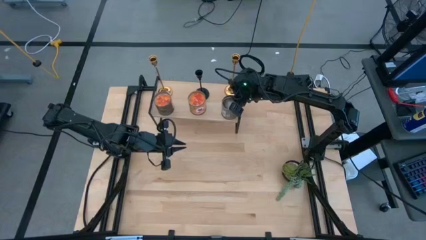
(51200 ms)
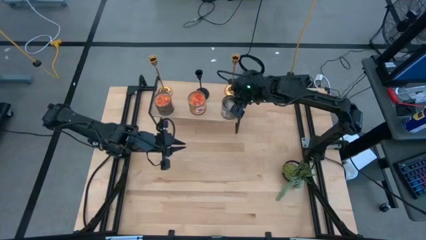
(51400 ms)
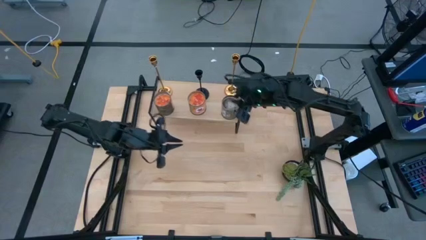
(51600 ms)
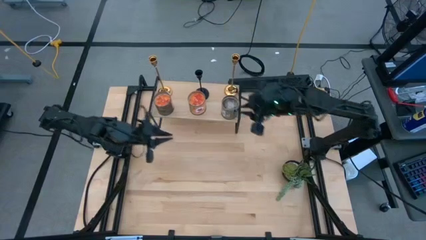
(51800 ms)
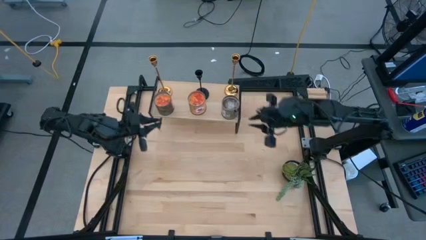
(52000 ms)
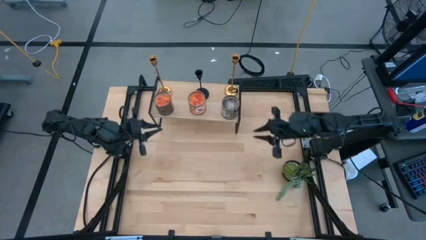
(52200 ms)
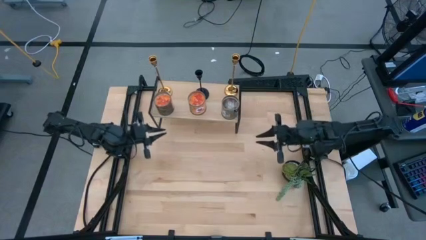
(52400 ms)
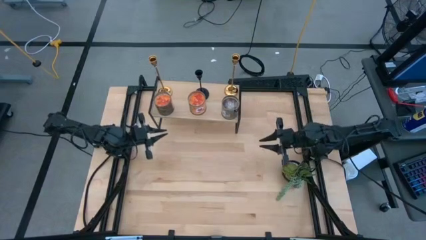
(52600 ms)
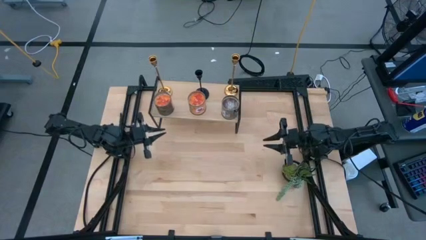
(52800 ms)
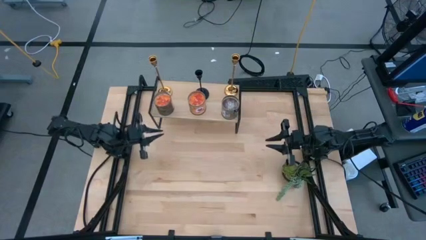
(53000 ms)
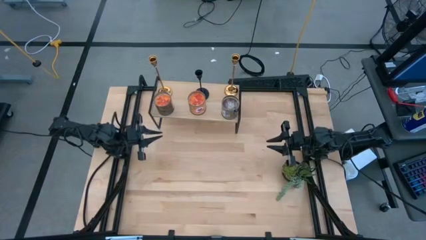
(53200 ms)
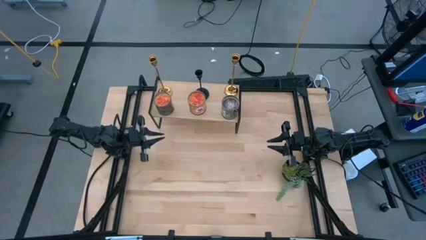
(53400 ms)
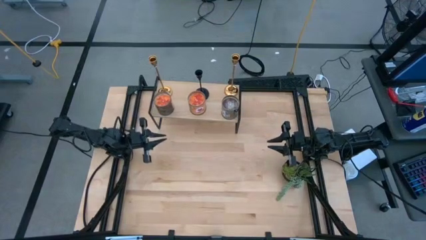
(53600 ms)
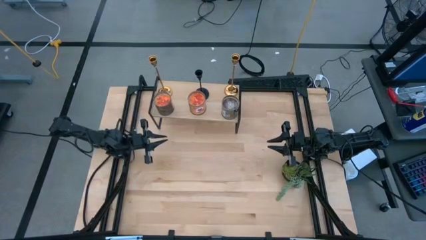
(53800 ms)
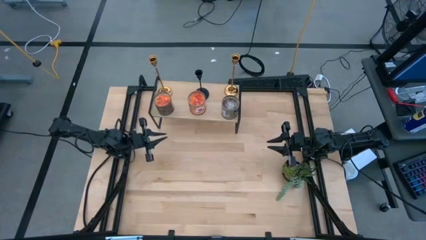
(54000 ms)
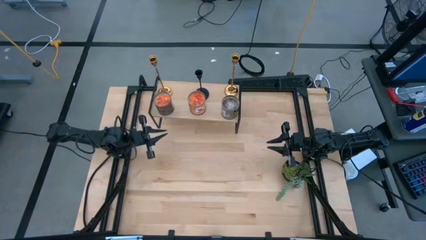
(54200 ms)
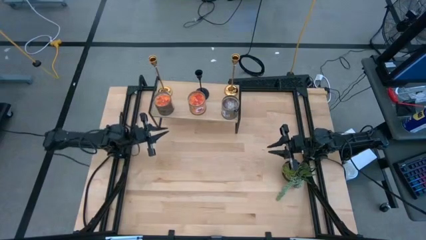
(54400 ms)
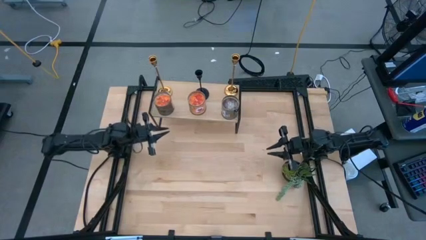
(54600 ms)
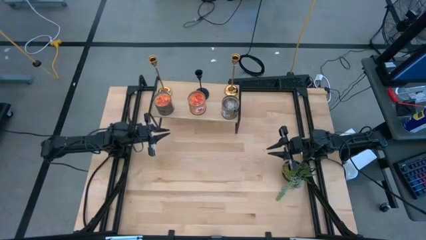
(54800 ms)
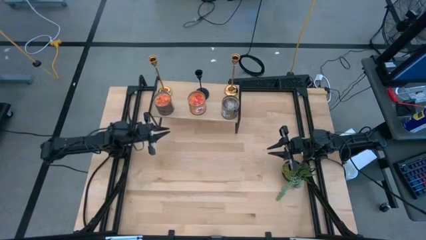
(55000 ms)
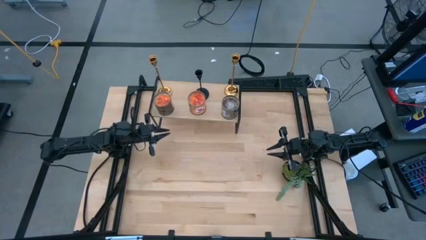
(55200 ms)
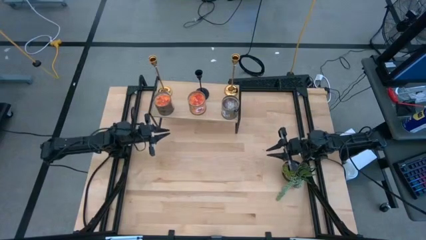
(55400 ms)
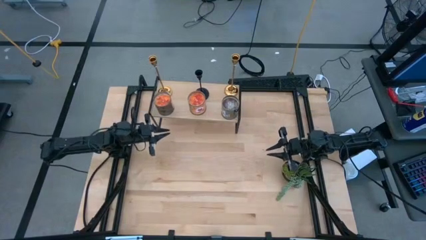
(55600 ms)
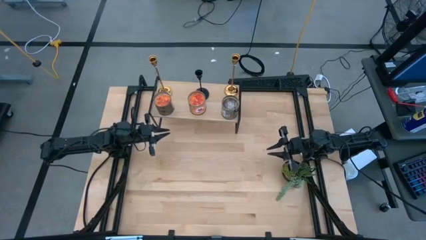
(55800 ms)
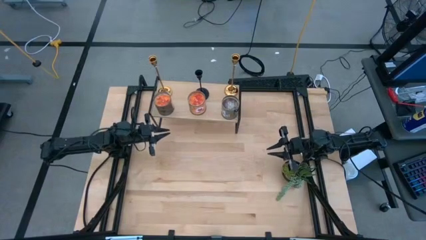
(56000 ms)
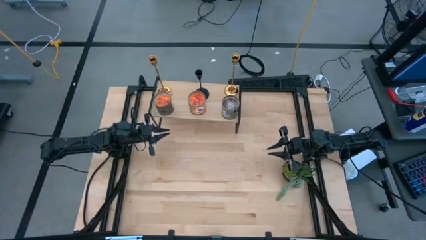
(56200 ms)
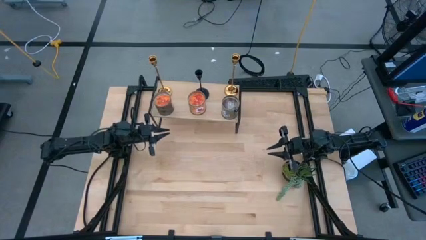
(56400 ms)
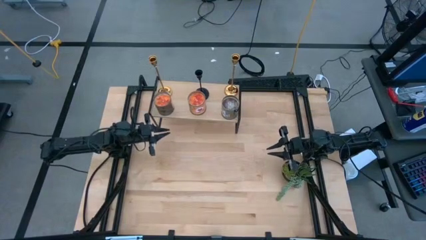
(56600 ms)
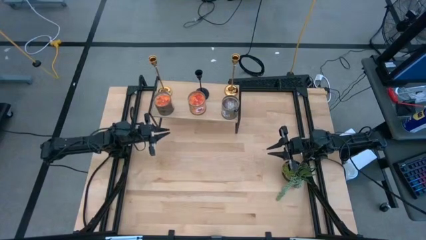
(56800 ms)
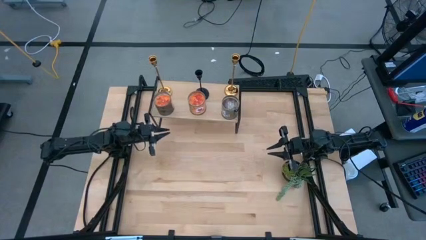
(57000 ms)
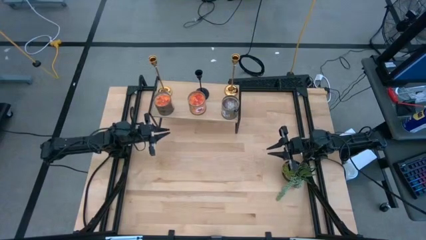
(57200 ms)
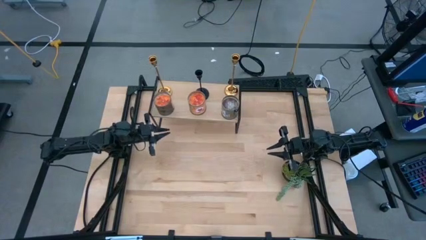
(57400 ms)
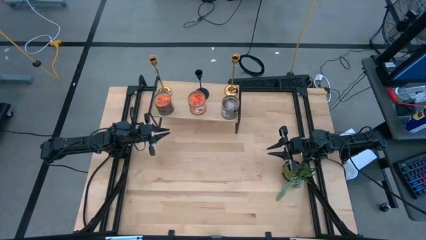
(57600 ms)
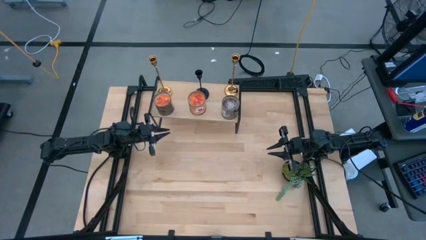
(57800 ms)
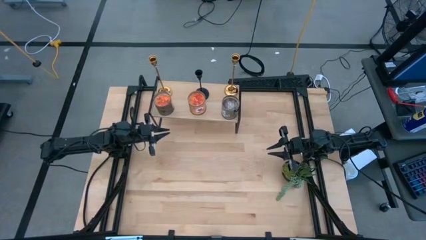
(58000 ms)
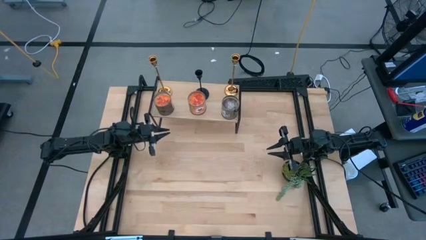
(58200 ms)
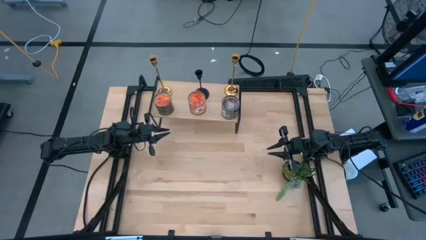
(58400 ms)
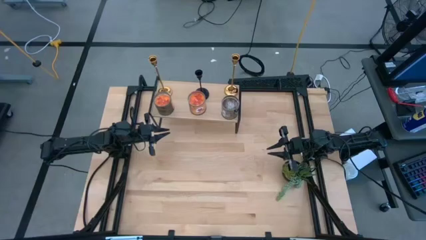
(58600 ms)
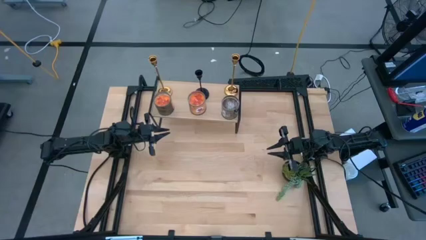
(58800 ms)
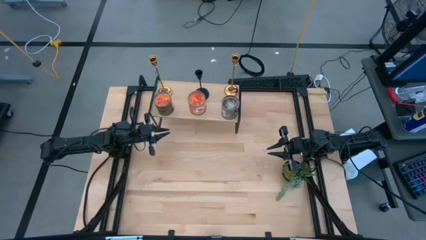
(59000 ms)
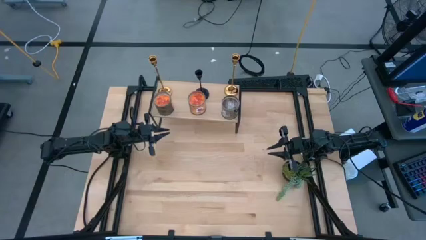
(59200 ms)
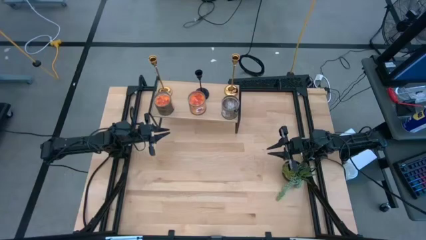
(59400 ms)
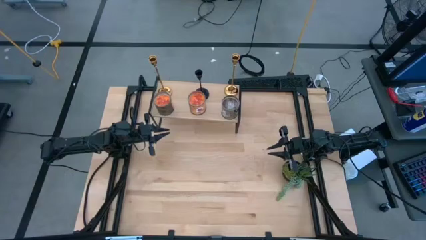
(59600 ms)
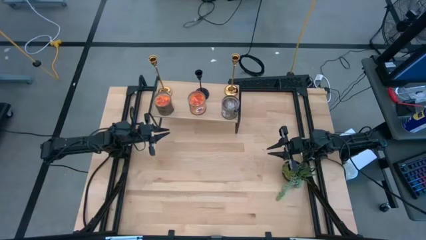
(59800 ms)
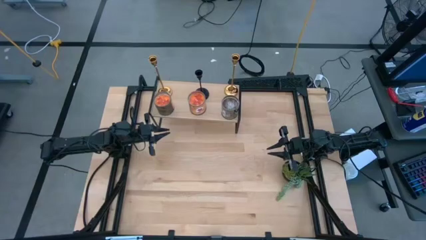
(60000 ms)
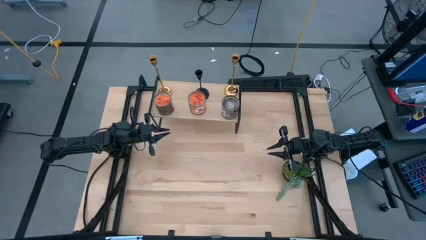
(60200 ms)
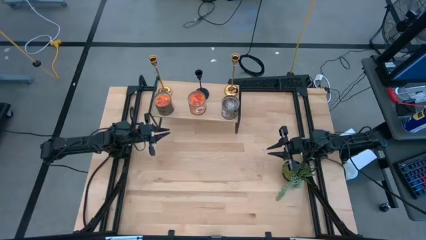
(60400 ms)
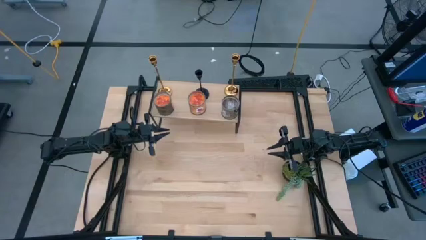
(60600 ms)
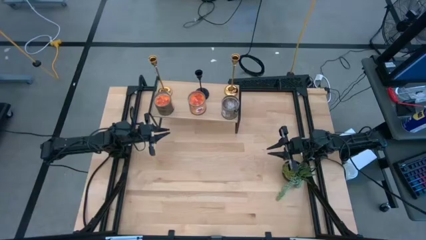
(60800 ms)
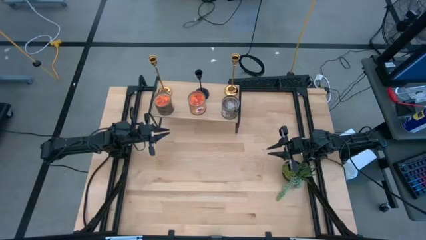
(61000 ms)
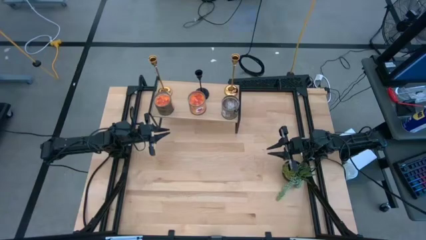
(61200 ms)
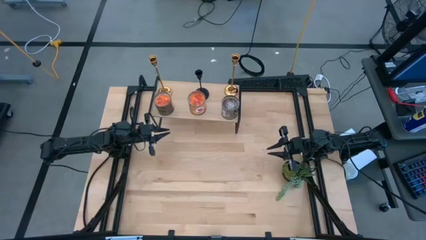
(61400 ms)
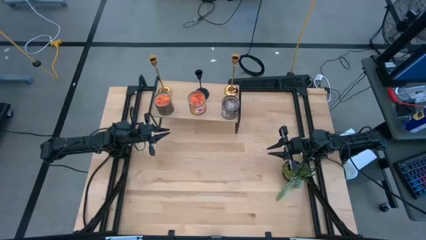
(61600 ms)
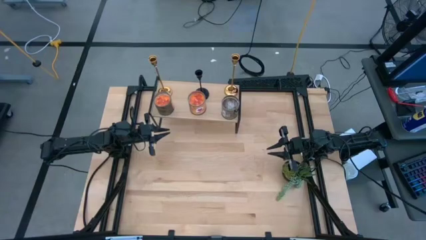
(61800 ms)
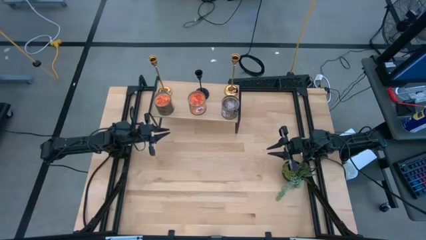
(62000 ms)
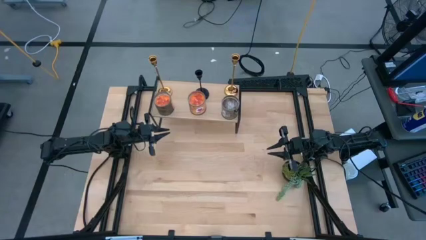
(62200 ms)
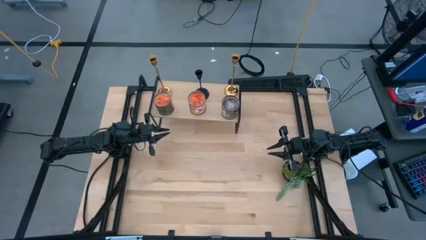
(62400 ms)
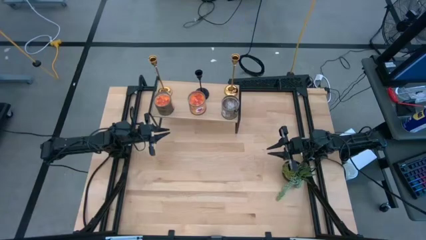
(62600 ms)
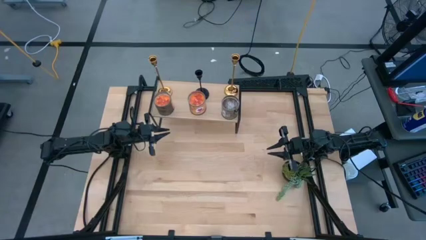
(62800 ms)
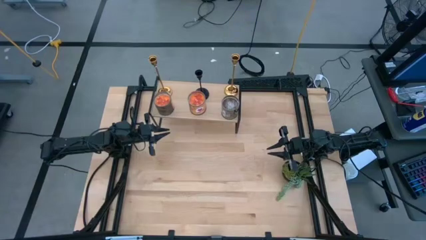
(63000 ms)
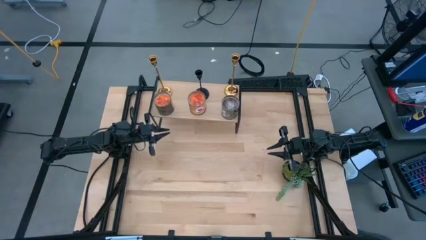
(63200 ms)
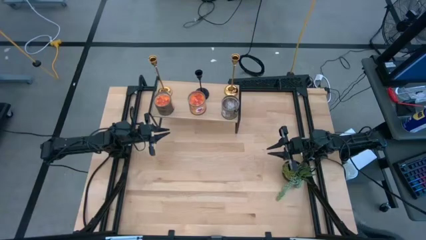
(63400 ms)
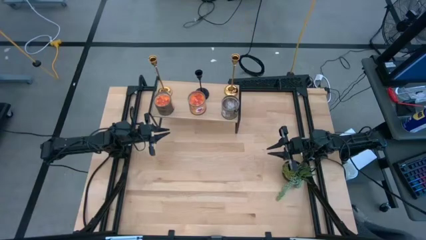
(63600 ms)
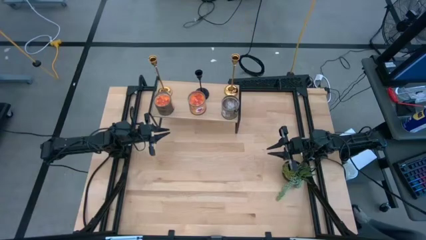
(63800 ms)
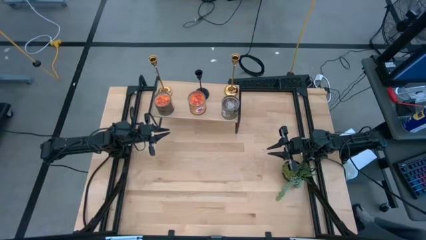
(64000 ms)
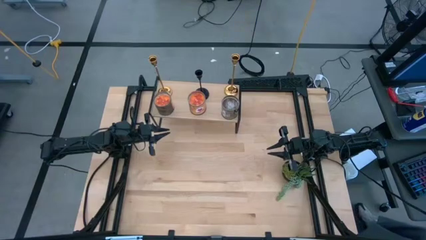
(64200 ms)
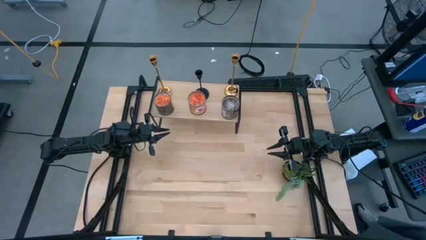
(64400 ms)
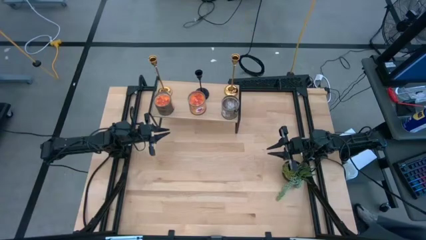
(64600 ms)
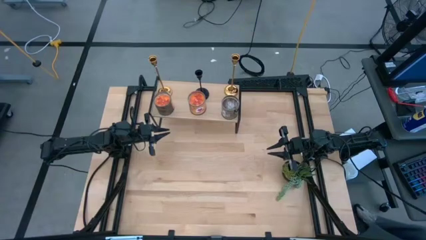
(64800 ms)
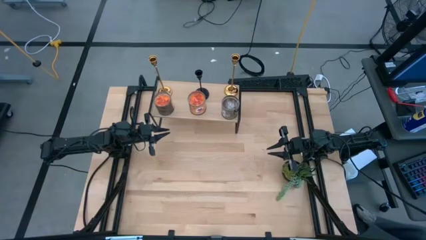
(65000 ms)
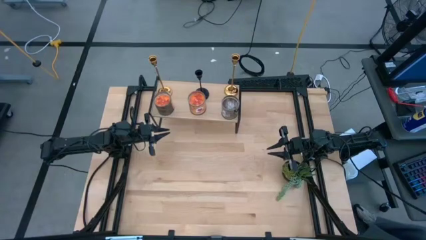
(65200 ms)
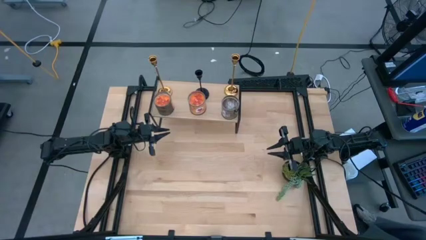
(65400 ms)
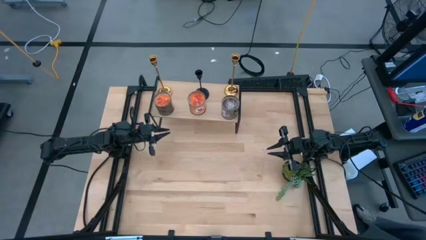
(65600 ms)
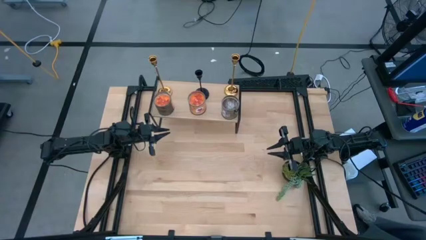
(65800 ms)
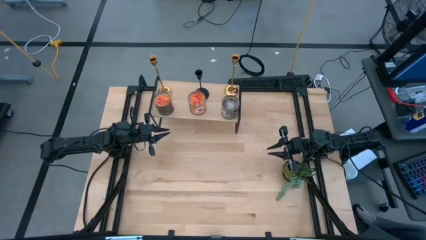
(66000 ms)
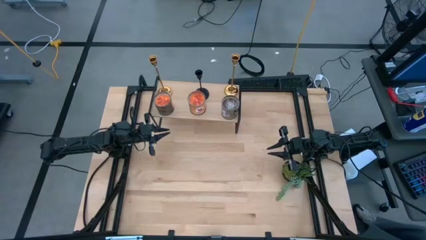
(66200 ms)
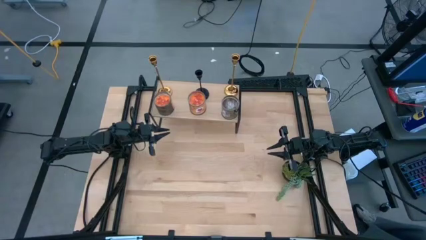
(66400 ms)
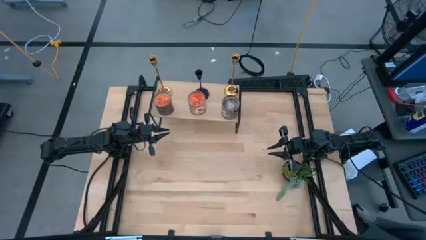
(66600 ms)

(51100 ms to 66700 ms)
Task: Pick & Place candle stick holders
Return to Home Position
